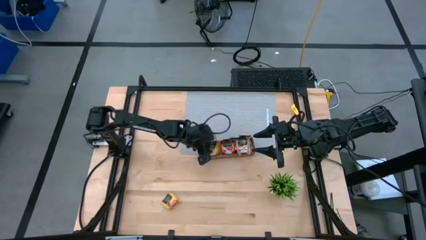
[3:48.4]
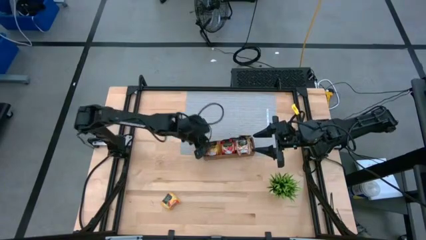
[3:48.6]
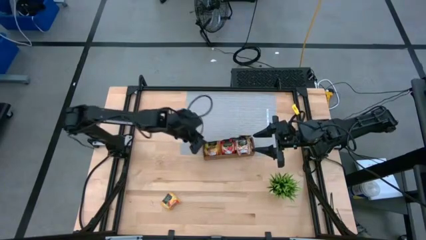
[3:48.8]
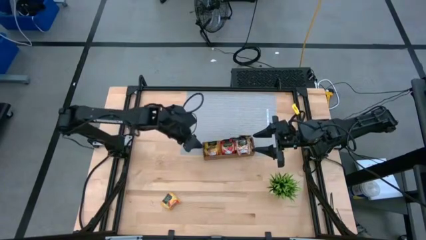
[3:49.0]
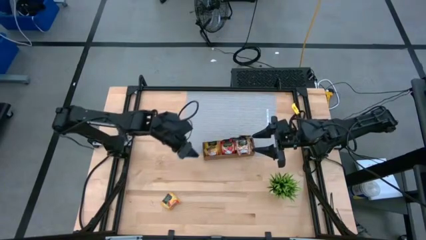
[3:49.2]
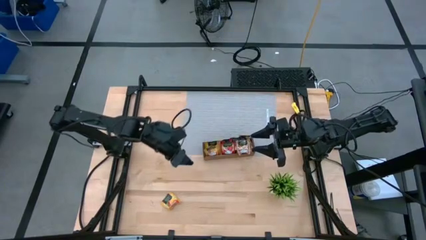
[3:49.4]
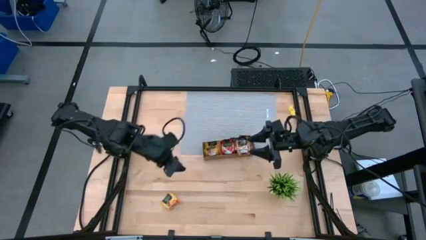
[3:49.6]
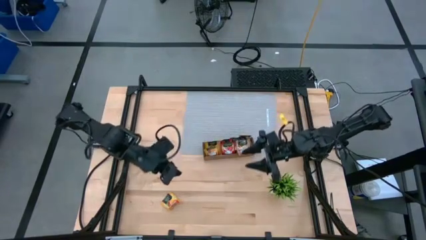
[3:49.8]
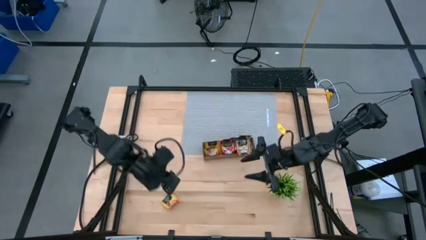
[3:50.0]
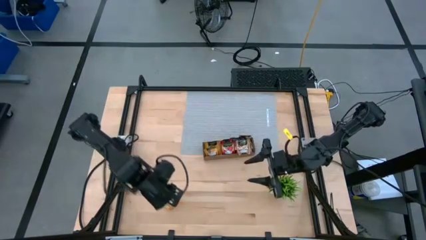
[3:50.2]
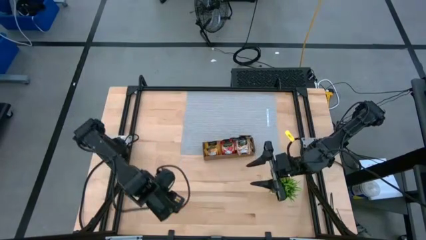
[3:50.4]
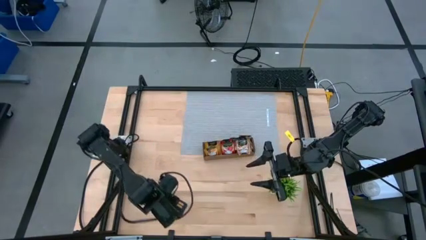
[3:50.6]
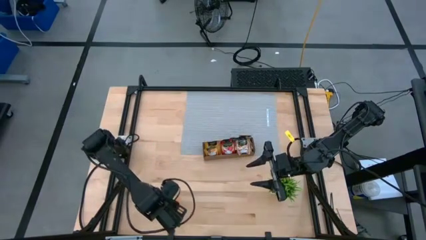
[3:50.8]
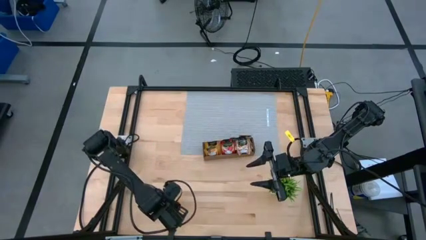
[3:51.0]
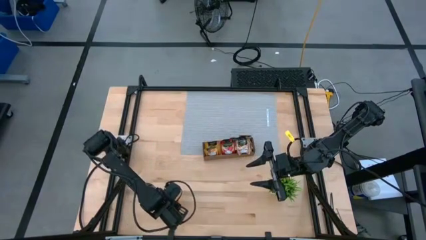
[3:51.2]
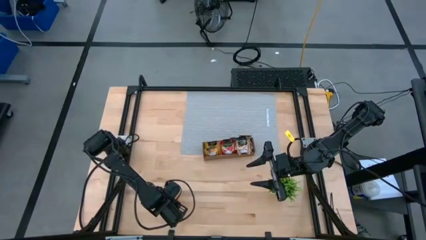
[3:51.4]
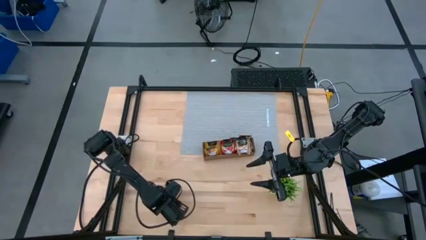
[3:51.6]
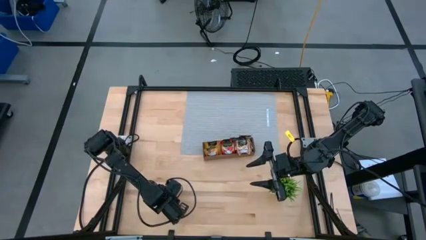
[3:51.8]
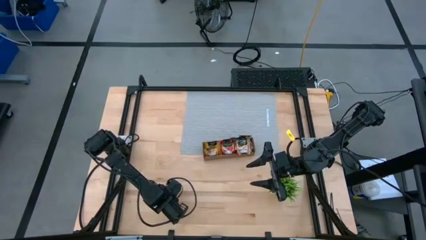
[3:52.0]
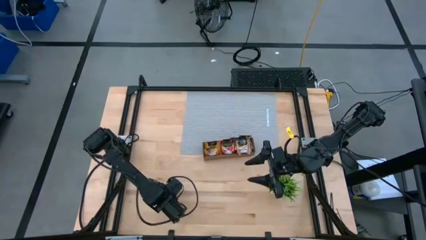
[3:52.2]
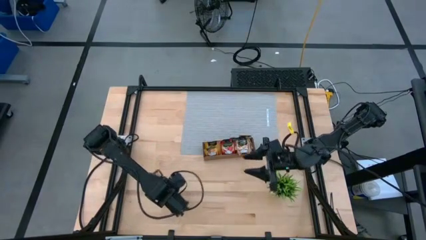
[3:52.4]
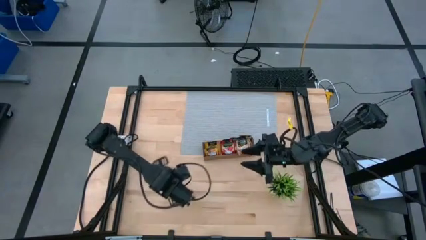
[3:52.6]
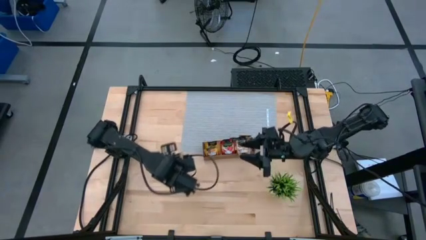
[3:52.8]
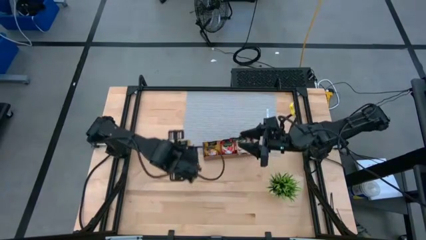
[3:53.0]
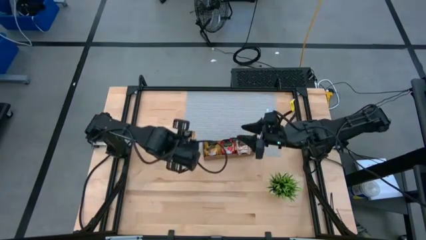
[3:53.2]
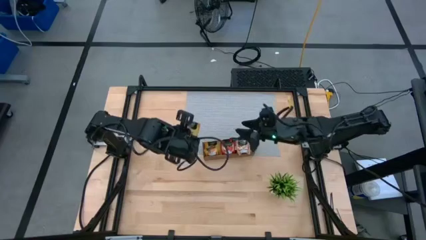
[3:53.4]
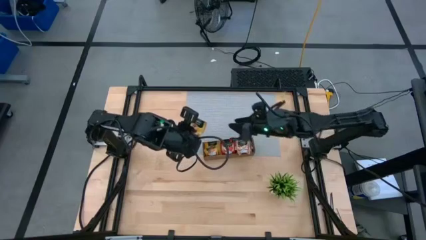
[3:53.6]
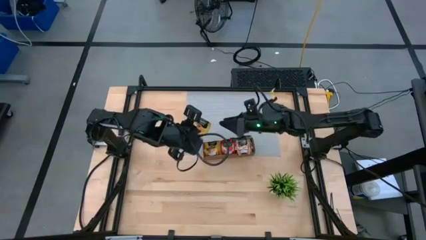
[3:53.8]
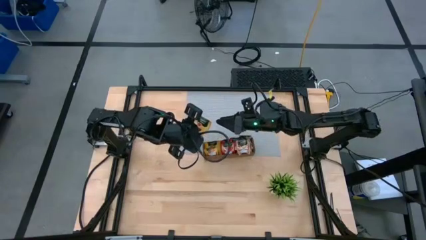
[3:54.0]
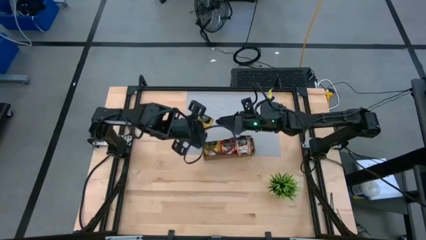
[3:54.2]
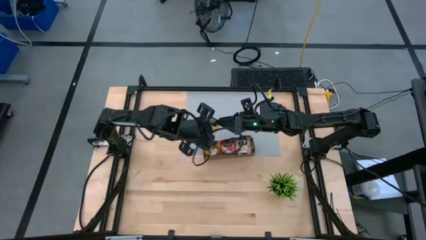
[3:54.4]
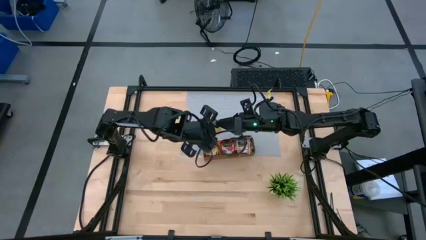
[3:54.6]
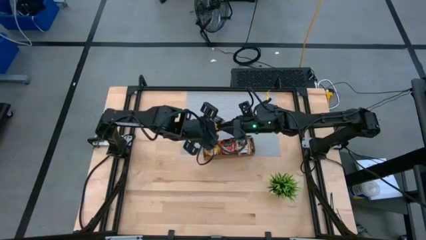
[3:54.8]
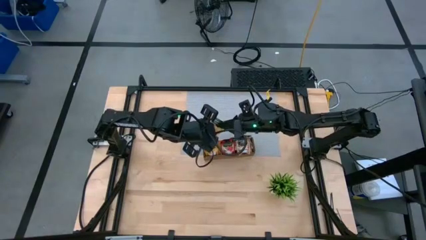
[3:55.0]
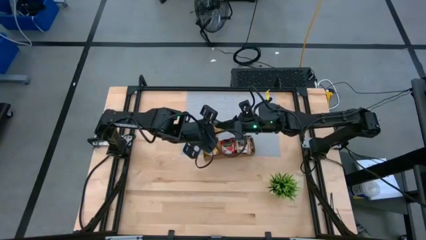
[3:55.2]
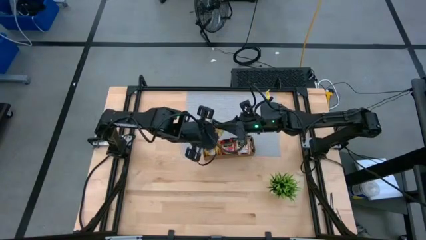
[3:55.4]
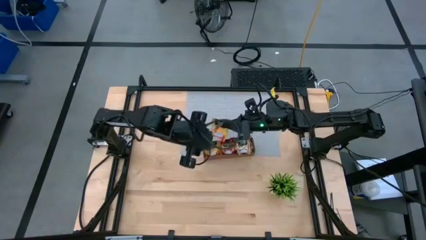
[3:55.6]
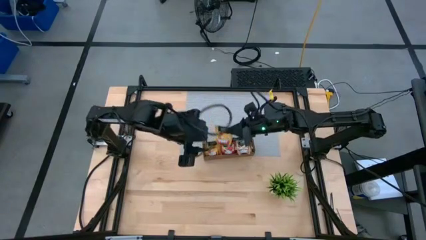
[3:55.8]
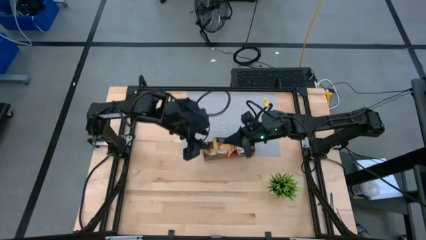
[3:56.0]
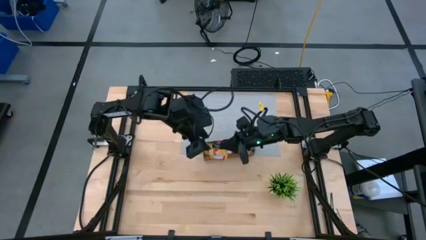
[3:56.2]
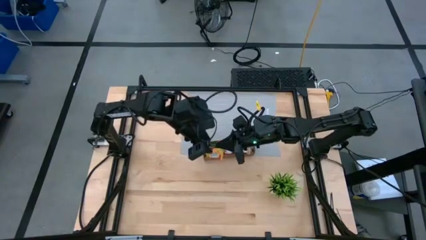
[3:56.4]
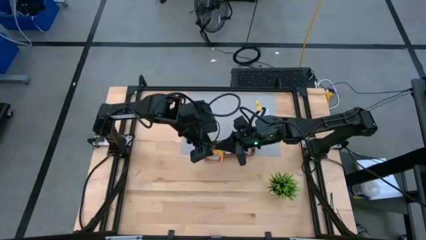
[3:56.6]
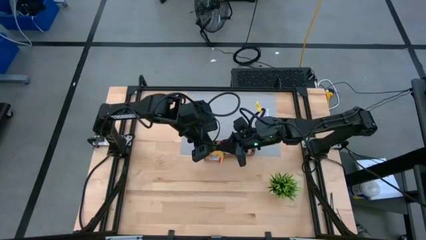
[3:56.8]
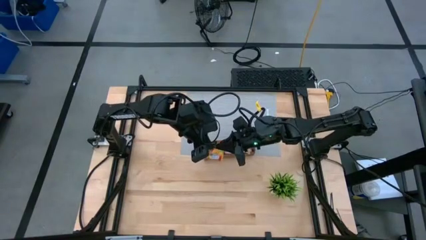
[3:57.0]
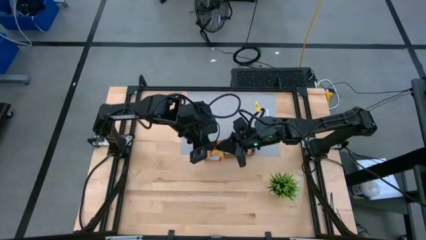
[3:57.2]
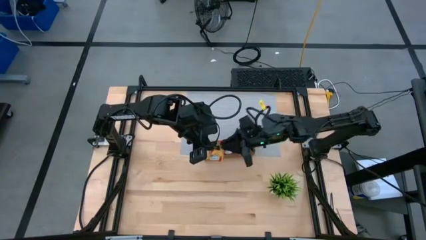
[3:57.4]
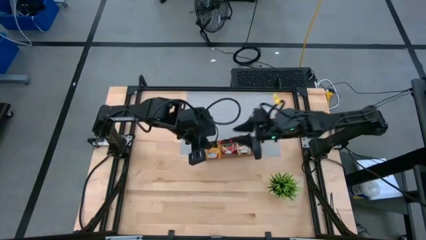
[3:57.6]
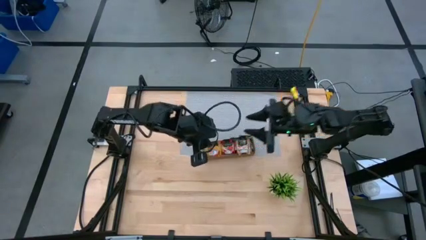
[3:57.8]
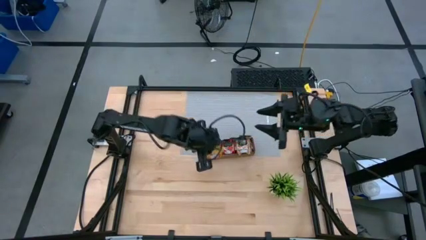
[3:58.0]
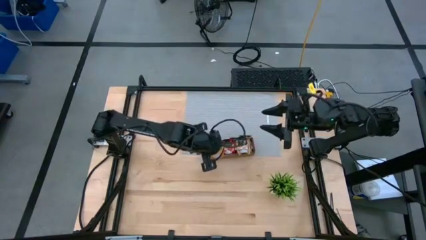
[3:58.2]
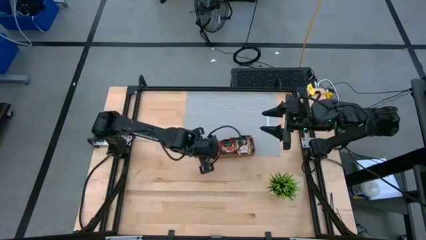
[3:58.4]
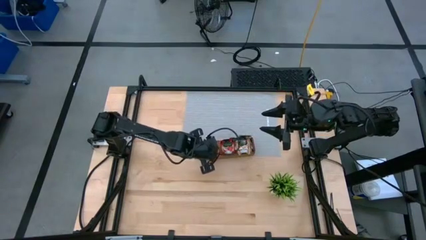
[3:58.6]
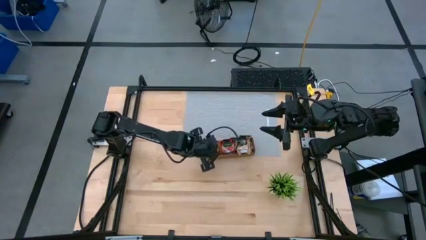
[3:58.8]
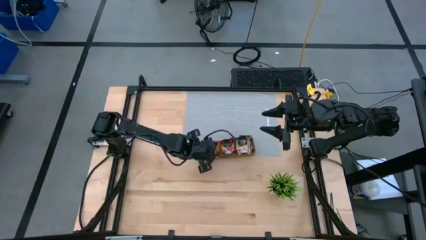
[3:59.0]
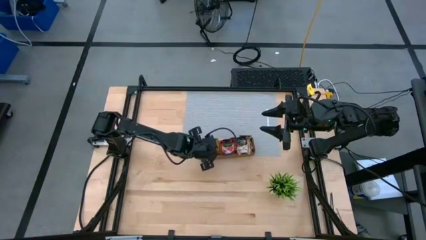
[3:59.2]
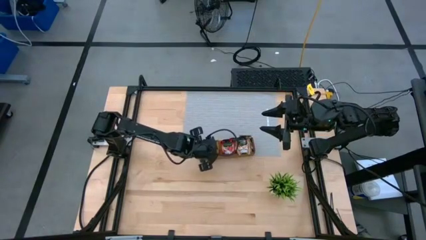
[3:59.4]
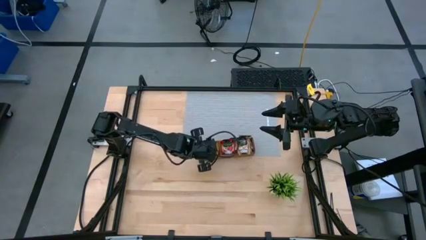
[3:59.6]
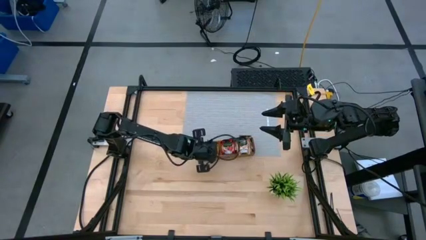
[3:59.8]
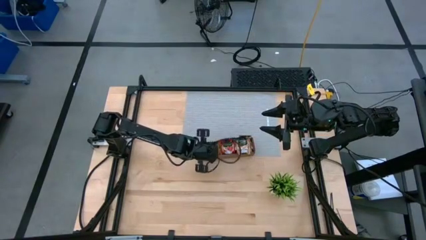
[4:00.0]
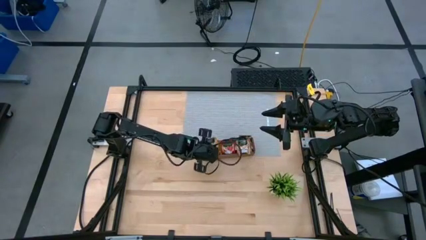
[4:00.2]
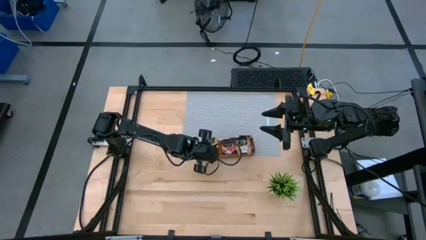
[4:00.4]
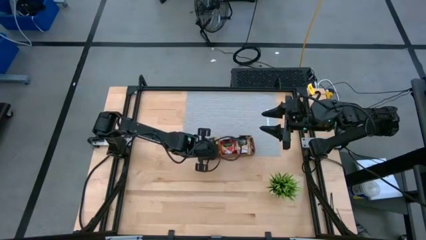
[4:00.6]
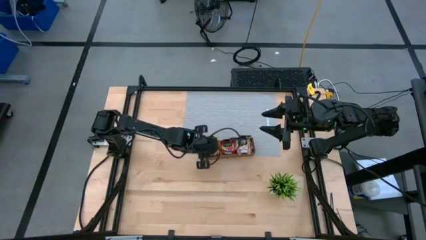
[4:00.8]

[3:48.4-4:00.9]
Task: Pick & Place Tea
Put the yellow tea bag into the left section of the wooden organizer

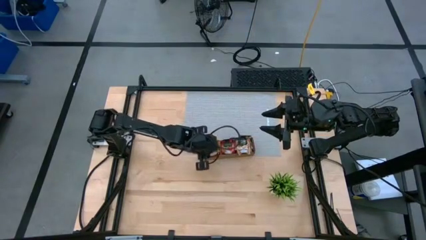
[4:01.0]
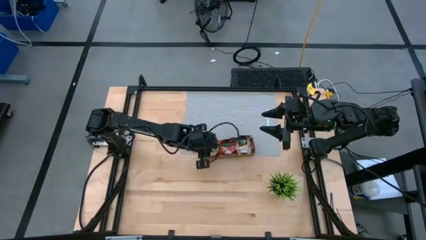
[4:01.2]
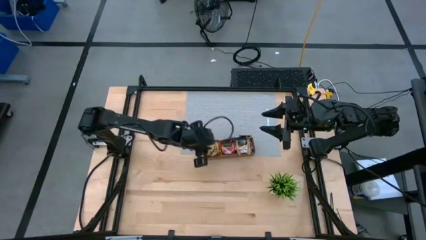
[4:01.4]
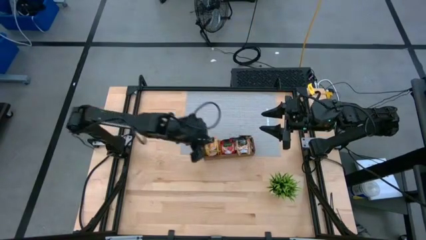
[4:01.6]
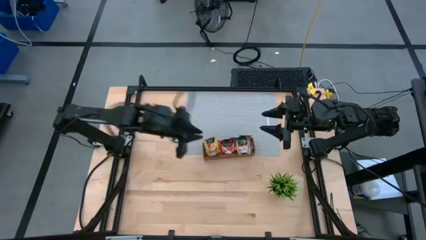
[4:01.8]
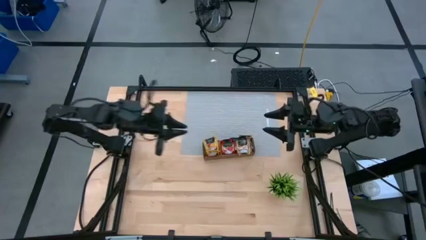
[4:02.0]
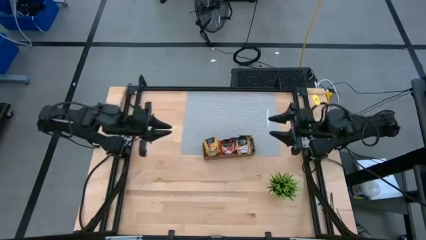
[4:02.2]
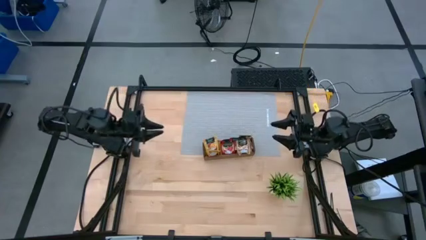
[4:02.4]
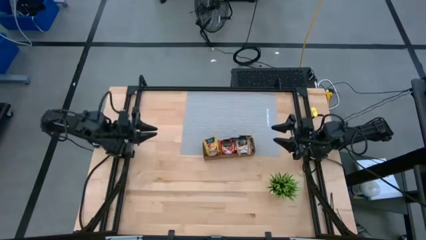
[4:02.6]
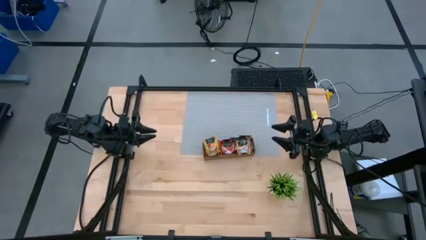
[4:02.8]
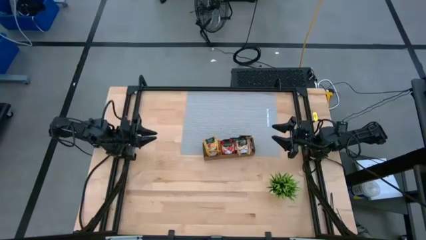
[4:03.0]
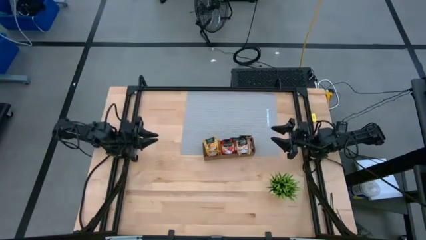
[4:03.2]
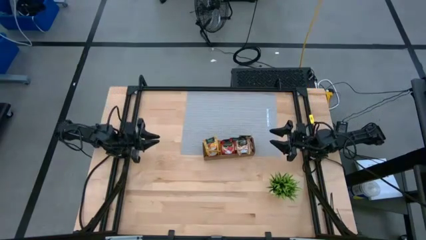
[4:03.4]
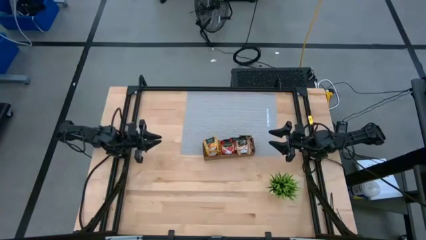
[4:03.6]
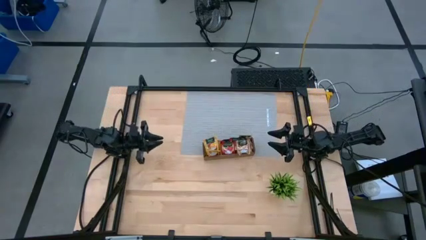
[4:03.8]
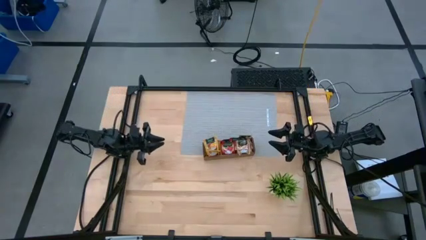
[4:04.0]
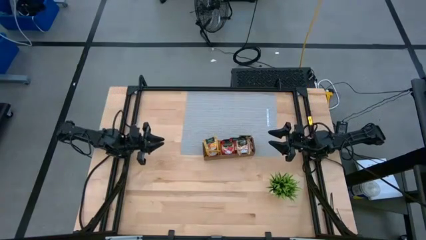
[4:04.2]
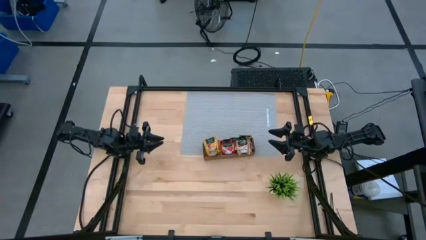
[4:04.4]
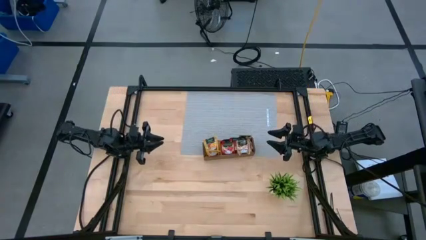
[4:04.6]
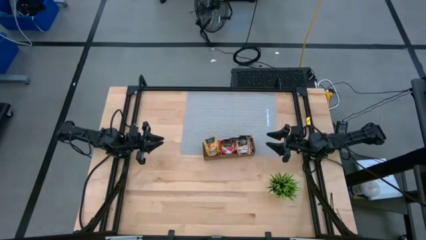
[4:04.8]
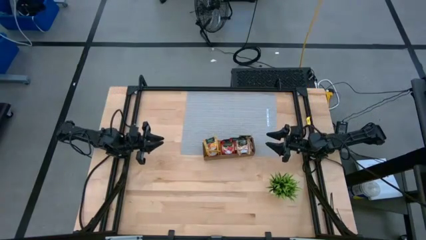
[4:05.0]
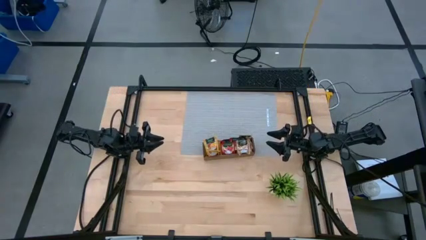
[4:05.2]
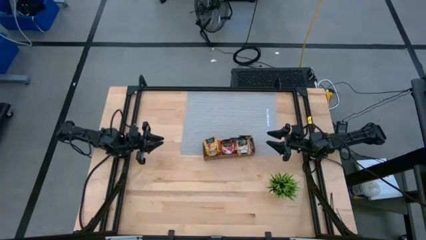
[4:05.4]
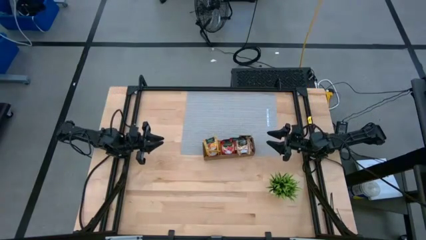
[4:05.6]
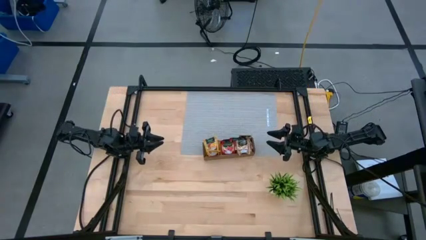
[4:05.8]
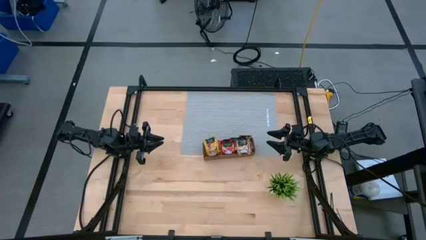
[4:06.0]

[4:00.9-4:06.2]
Return to home position
